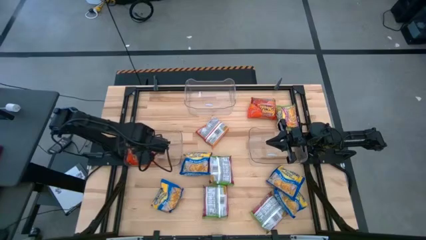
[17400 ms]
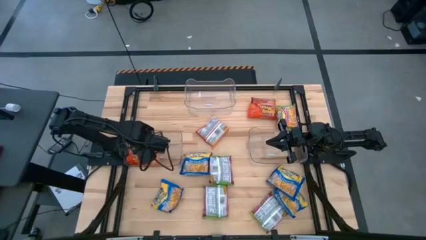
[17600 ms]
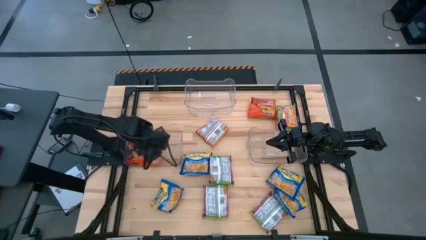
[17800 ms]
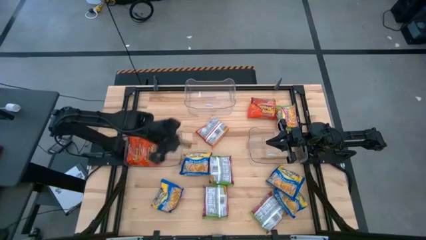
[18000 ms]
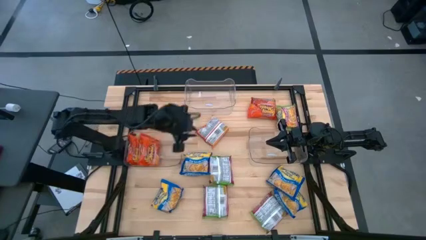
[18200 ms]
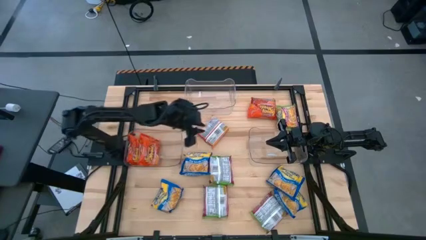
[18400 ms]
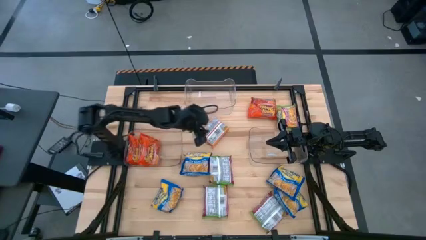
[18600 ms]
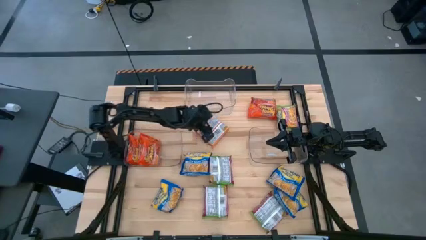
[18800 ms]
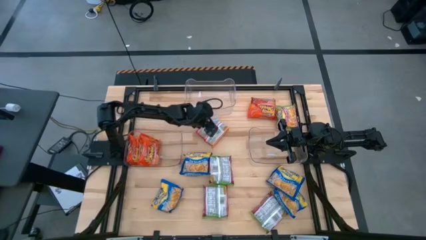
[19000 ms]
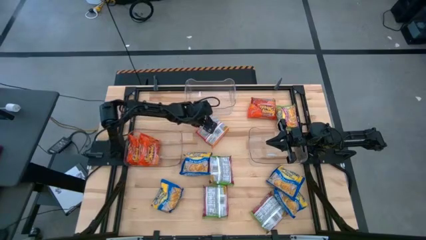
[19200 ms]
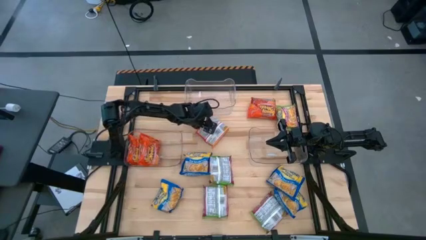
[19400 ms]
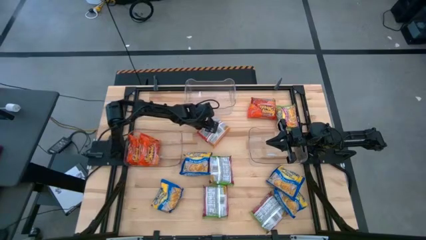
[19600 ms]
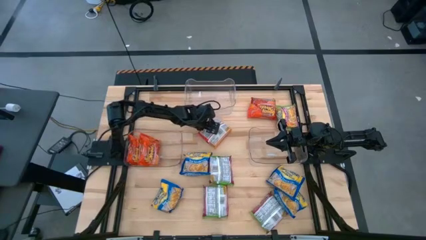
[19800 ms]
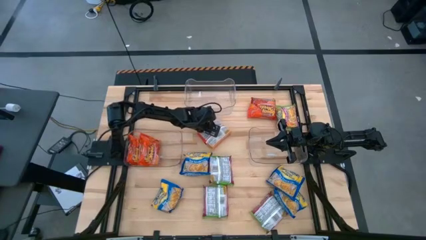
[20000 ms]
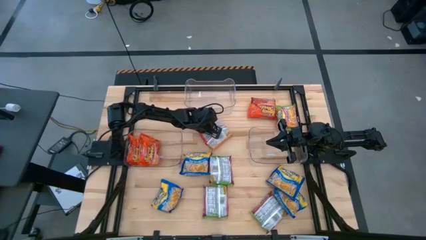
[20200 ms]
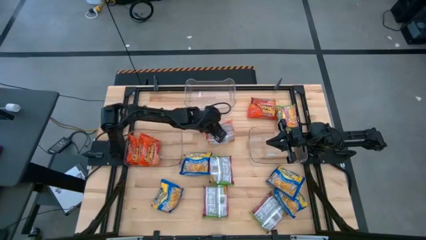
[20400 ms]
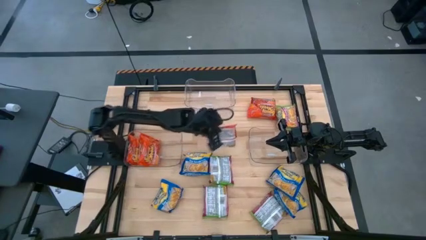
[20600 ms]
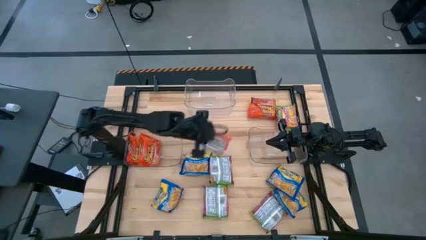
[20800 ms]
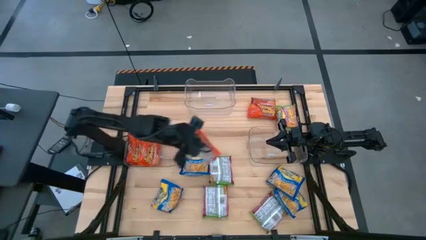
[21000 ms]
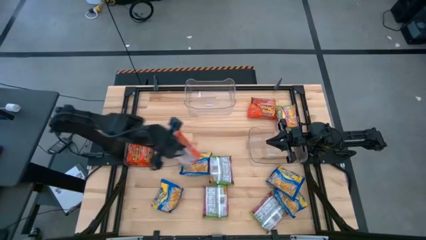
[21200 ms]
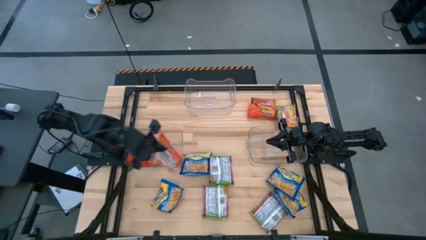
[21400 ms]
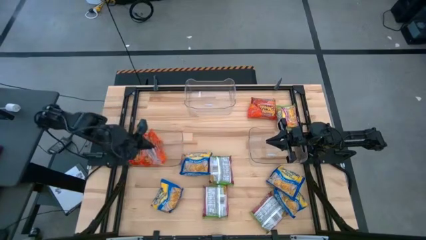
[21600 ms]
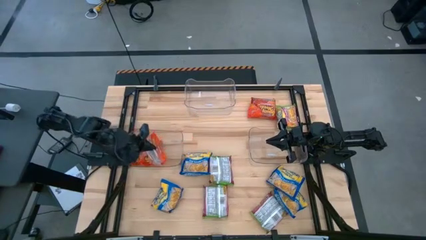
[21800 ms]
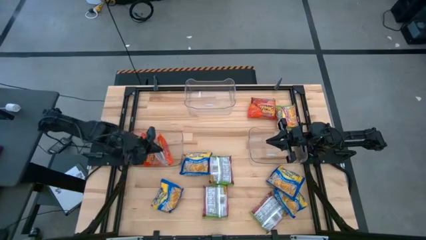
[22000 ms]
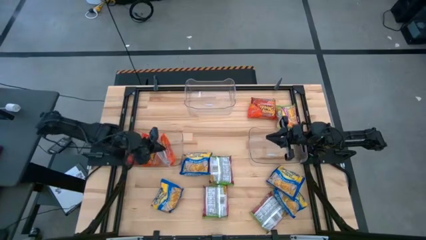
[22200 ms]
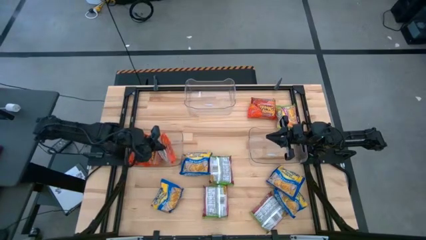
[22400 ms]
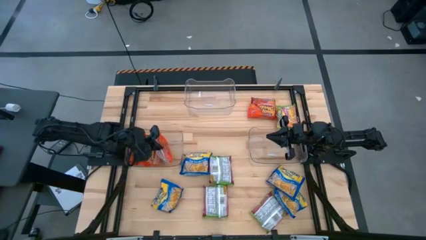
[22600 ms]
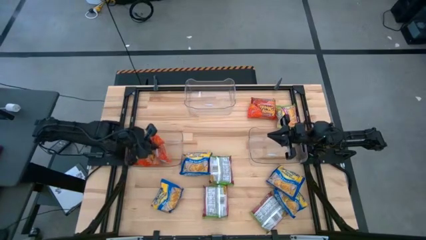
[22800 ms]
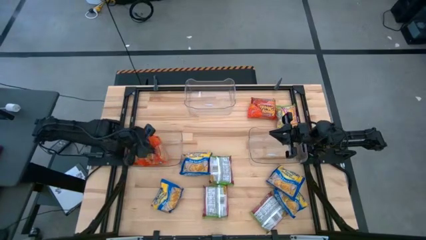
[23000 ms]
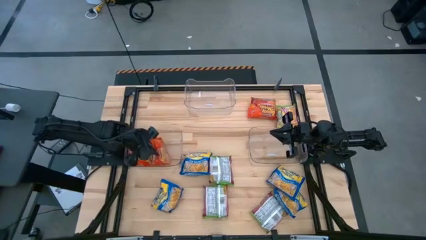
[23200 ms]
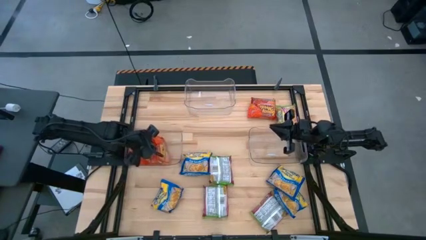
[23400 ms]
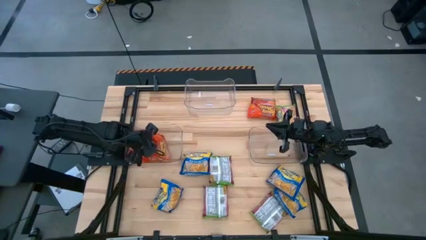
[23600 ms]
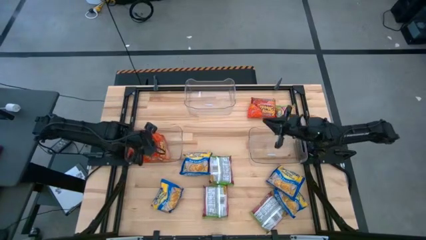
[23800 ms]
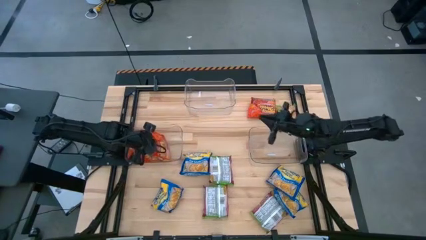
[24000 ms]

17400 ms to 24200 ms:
Task: Sort Maruchan noodles
Put the orange noodle from the middle into the middle left transparent bin

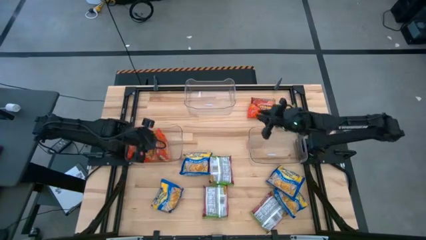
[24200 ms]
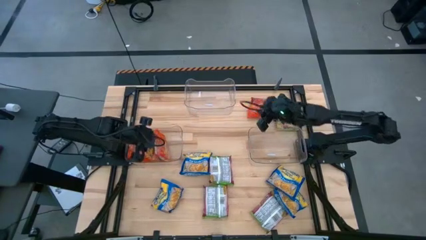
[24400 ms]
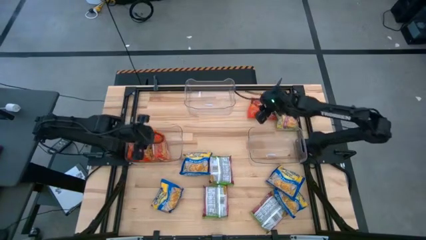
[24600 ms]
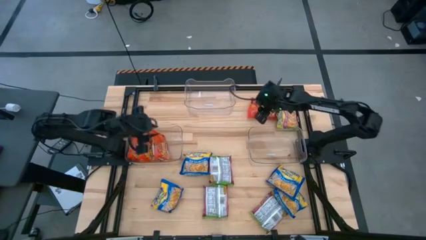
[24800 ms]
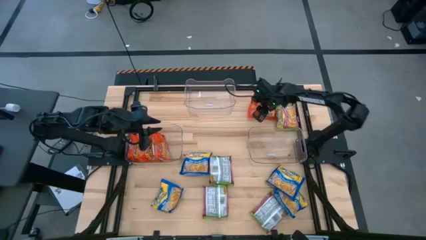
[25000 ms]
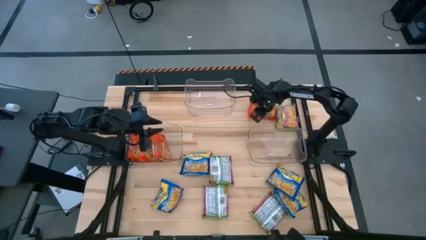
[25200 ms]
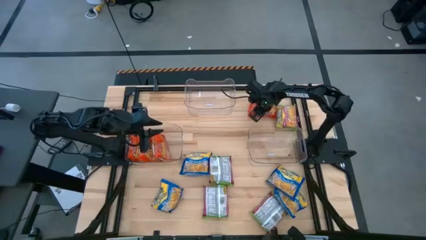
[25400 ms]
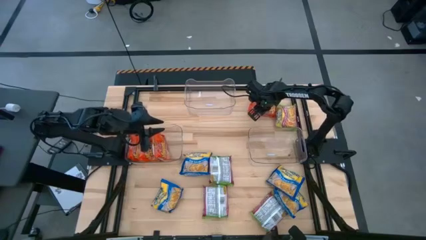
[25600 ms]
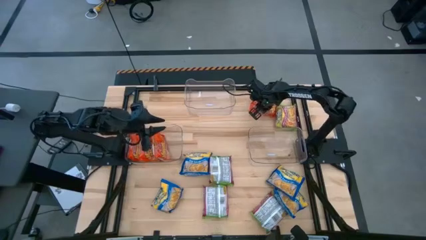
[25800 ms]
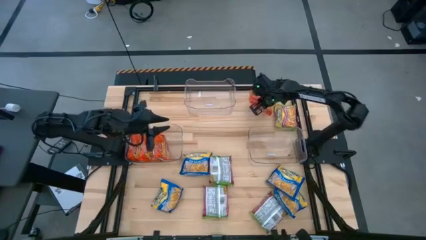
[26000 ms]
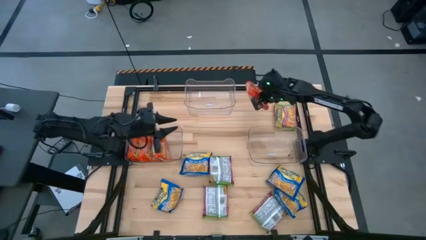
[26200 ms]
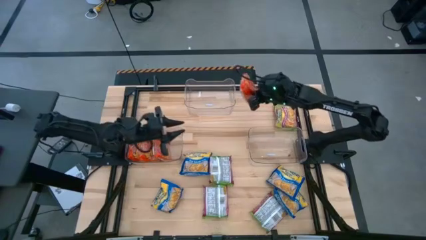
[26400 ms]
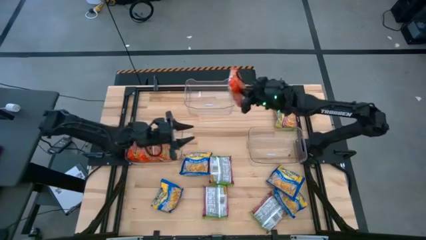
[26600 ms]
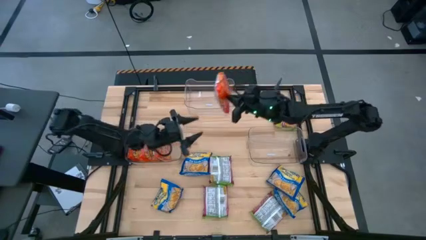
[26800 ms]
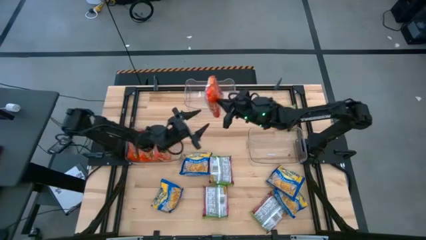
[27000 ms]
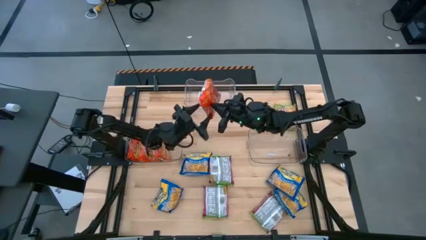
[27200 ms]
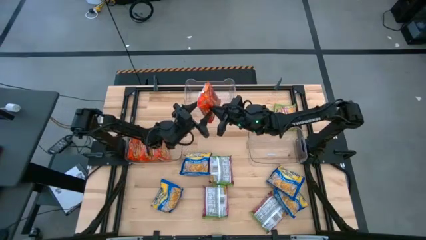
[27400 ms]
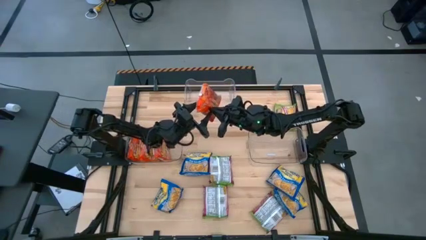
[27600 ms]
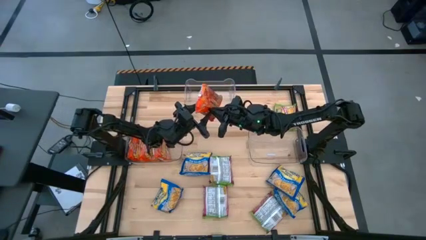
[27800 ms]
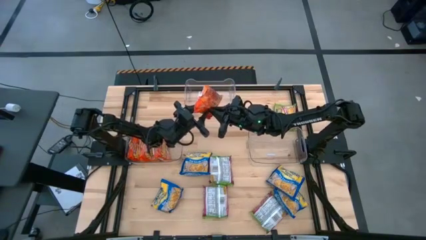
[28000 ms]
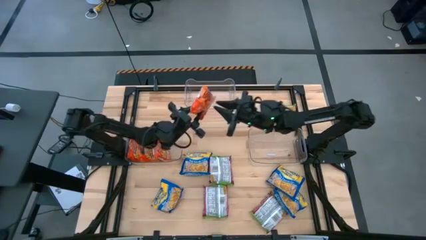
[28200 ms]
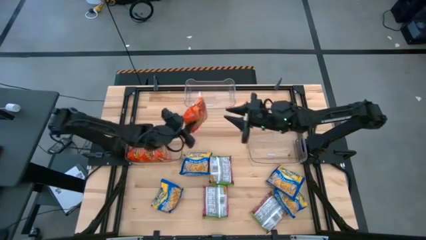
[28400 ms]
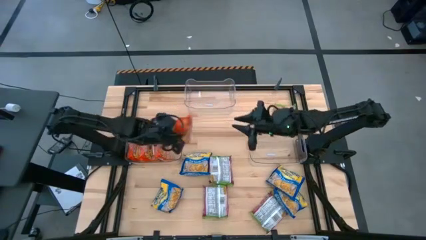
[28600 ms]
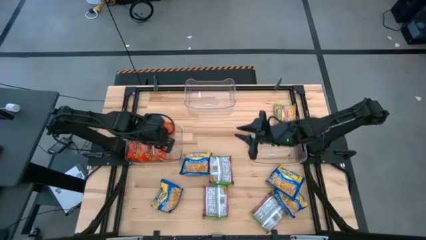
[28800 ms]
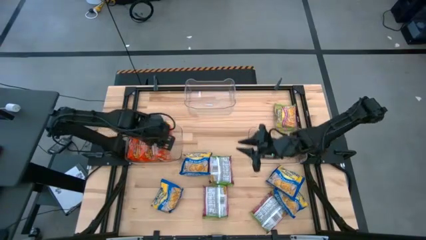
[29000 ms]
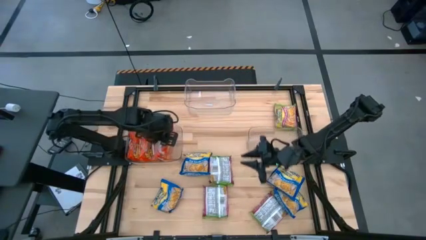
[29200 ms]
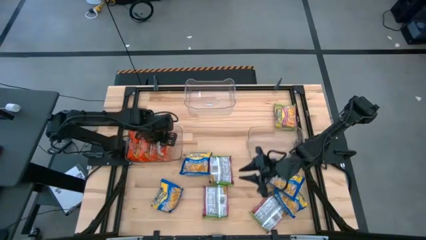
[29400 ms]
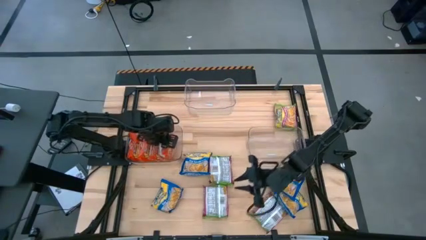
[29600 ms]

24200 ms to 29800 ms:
Put the orange noodle from the top into the middle left transparent bin

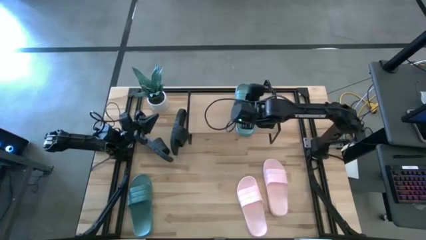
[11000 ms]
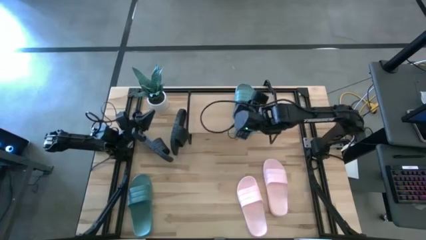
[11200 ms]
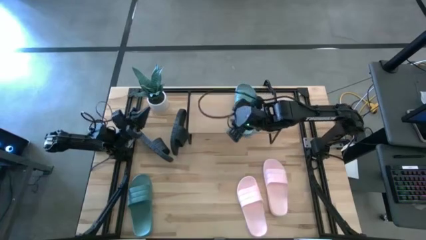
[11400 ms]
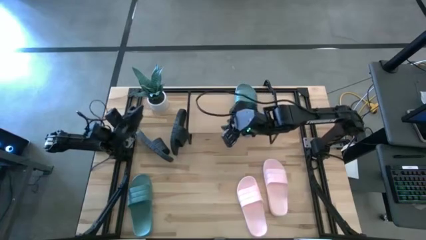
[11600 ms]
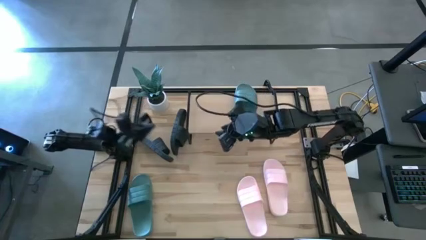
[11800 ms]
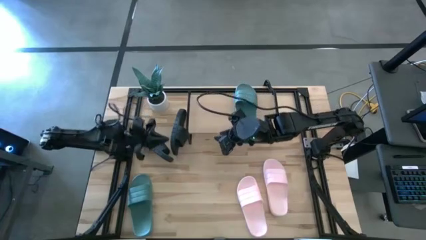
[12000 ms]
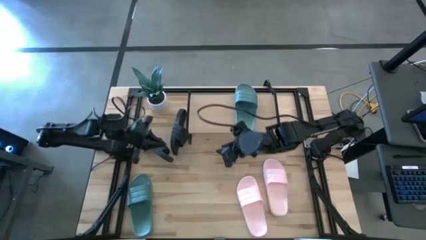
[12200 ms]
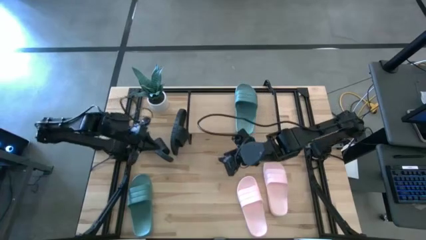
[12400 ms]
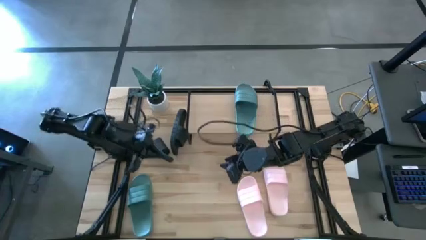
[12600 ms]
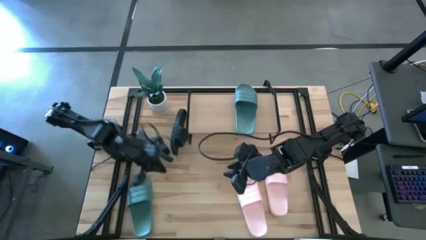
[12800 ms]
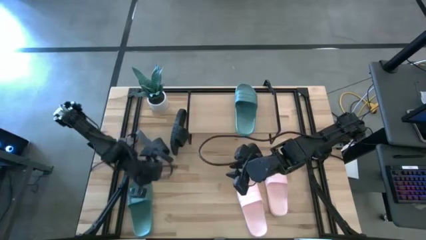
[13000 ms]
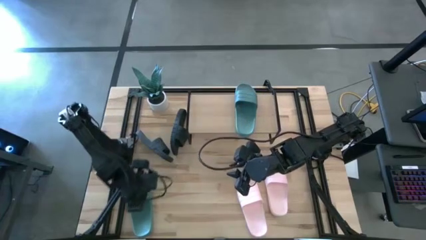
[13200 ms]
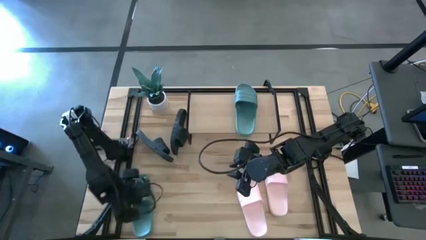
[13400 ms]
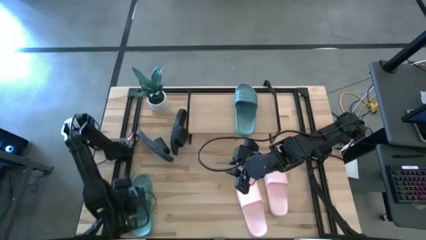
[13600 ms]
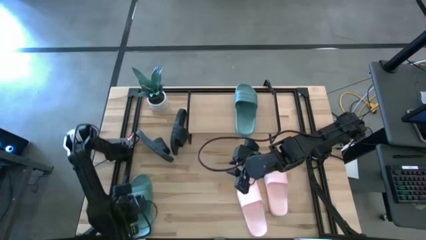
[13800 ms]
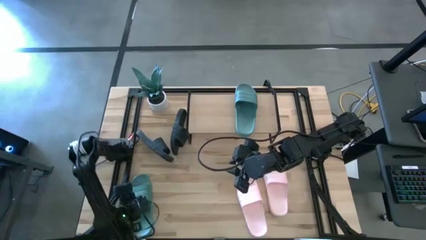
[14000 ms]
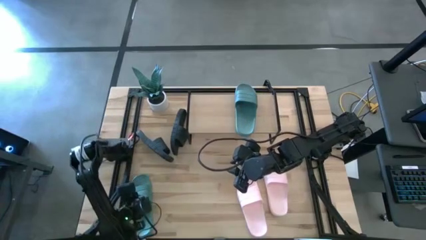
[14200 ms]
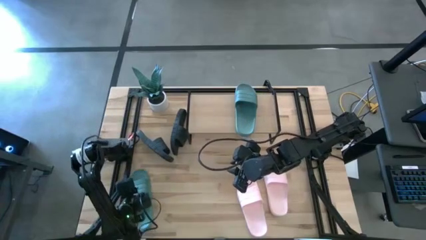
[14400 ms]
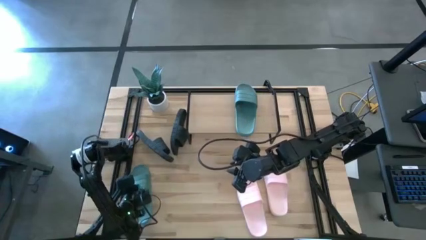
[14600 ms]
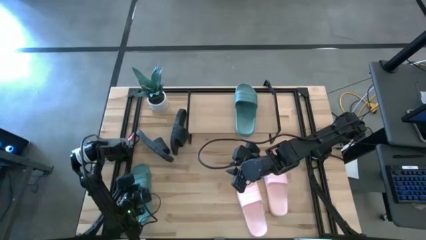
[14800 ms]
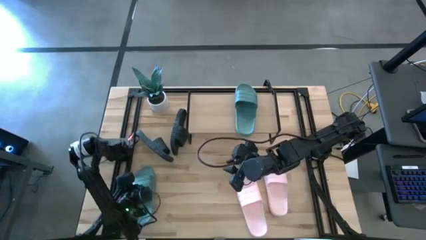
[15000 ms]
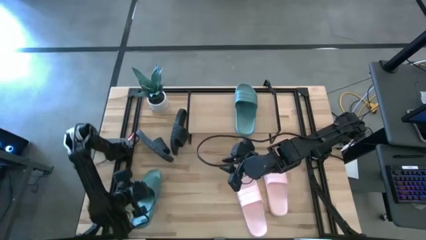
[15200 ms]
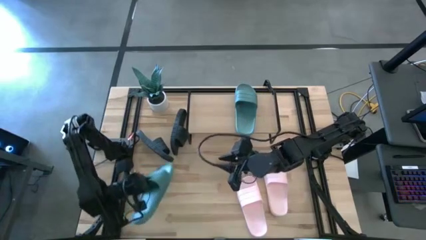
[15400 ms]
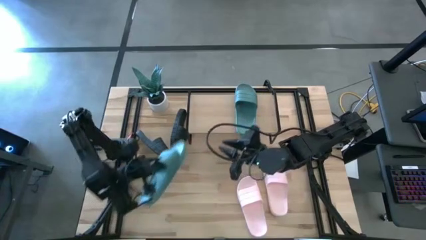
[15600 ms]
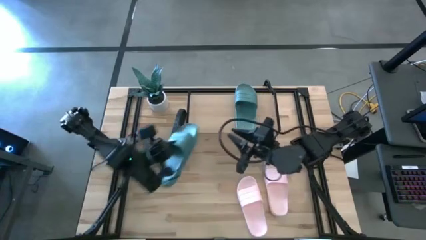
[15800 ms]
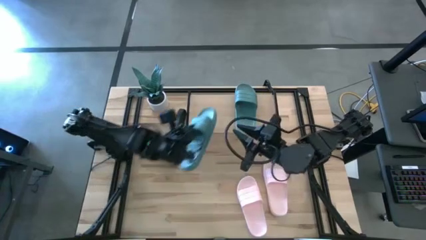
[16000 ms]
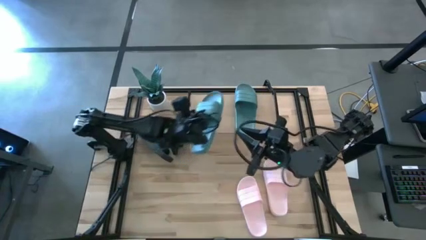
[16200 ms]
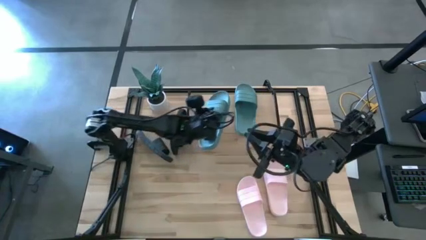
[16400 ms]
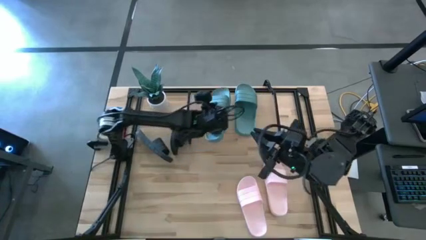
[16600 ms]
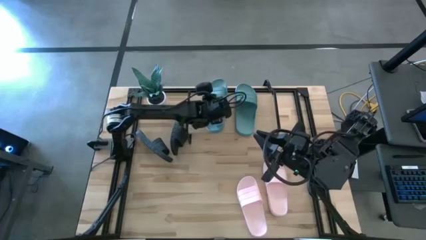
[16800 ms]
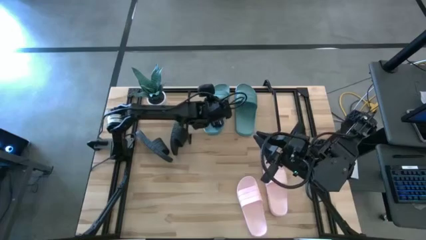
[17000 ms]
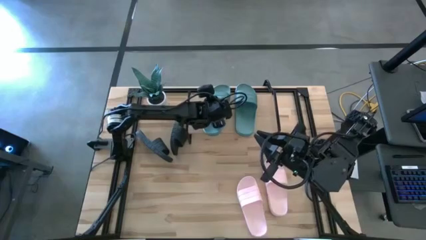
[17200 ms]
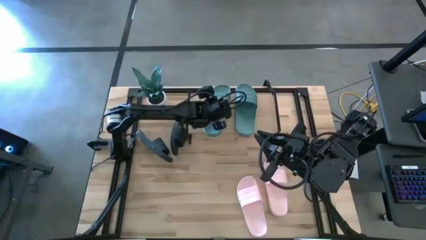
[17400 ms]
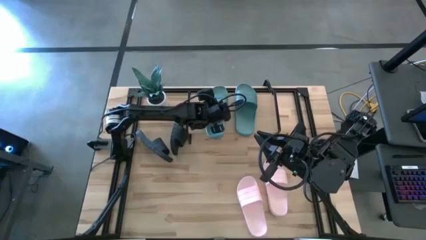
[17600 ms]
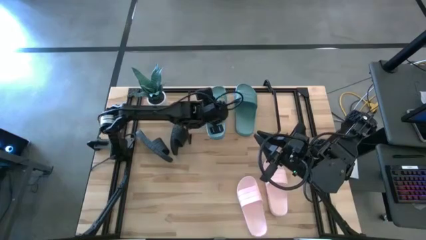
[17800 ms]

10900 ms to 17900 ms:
Task: Pick and place slides into the shelf
Put the left green slipper on the shelf
